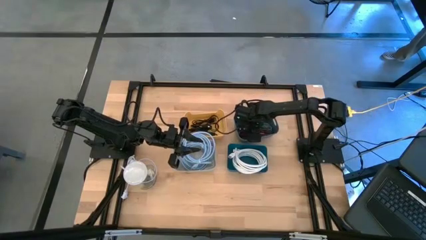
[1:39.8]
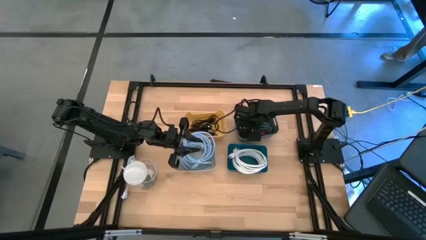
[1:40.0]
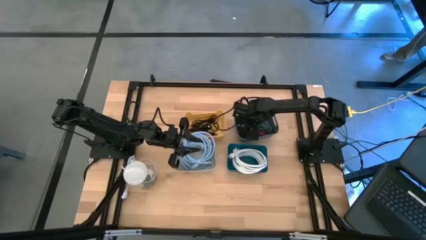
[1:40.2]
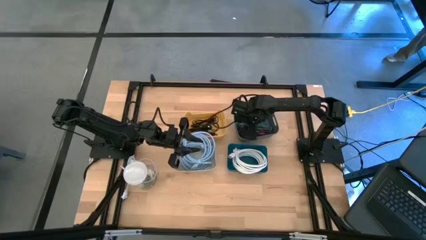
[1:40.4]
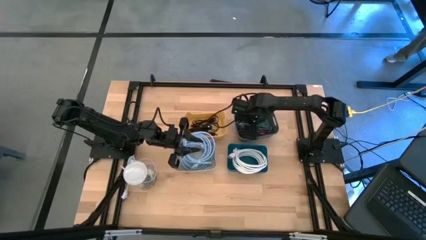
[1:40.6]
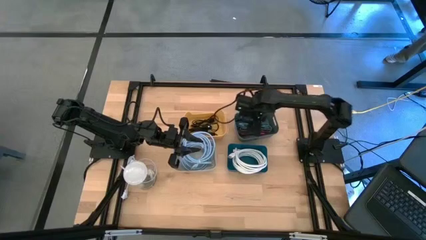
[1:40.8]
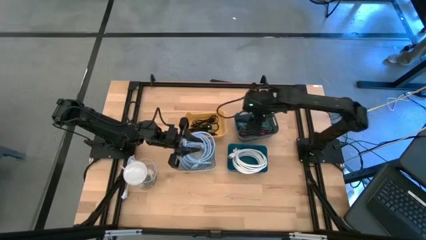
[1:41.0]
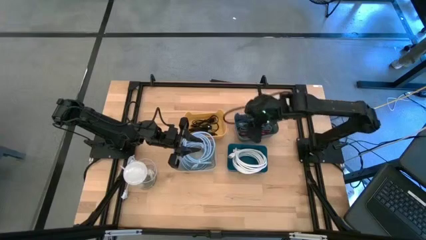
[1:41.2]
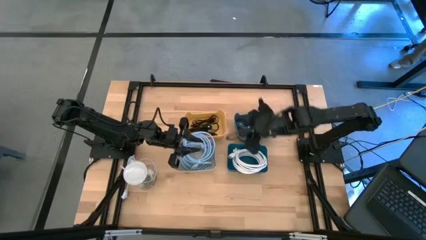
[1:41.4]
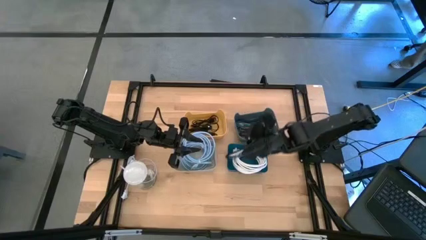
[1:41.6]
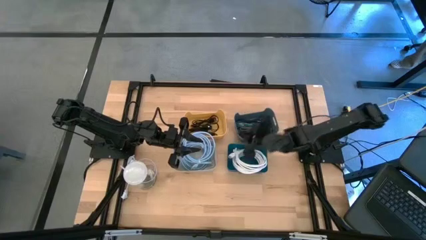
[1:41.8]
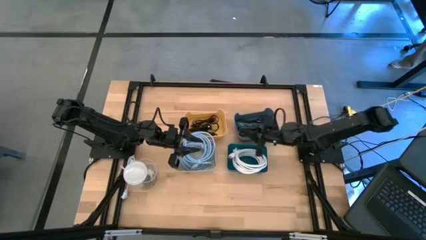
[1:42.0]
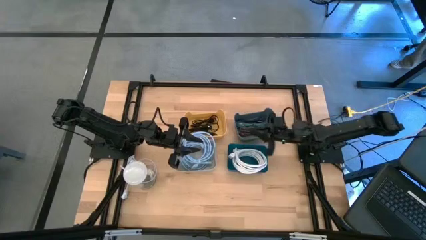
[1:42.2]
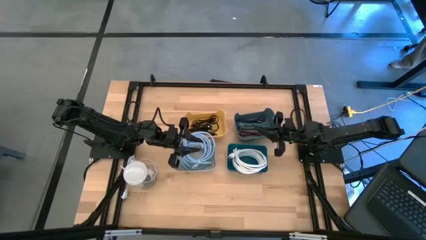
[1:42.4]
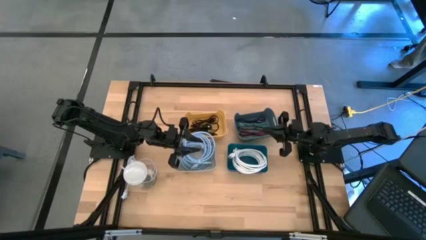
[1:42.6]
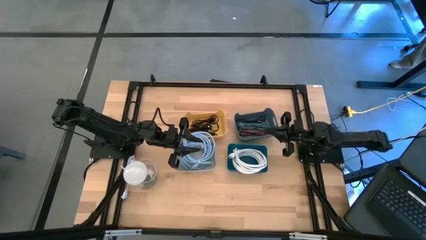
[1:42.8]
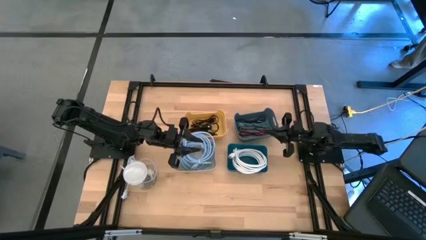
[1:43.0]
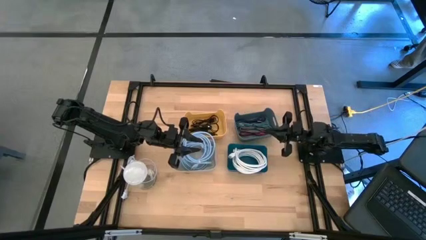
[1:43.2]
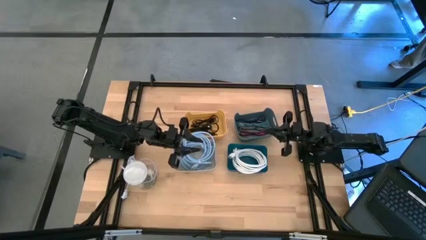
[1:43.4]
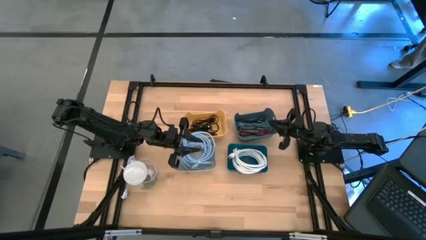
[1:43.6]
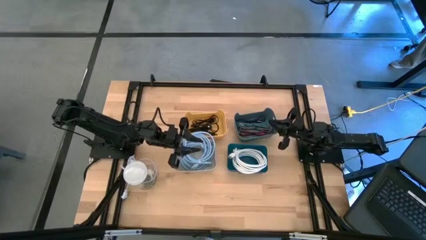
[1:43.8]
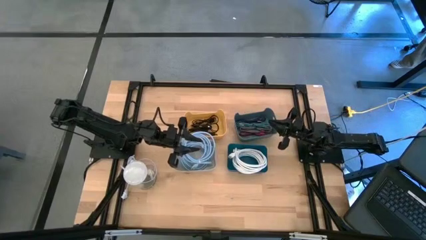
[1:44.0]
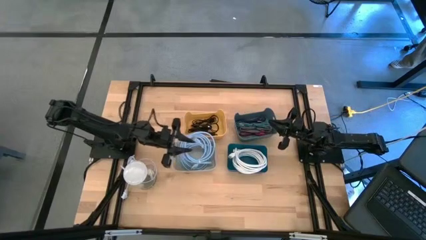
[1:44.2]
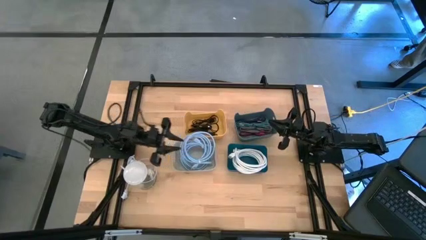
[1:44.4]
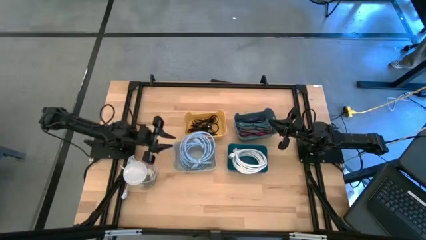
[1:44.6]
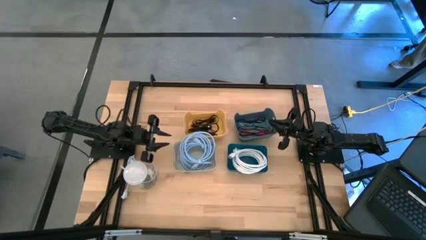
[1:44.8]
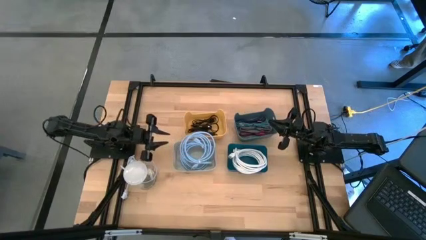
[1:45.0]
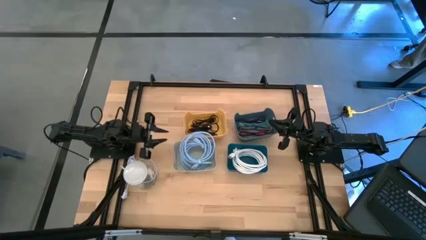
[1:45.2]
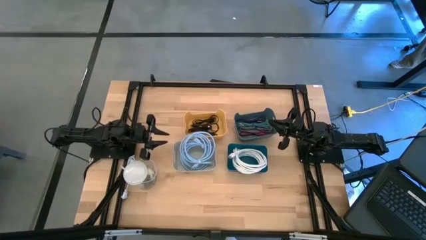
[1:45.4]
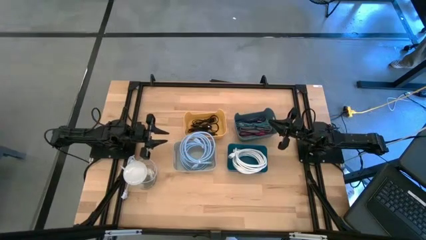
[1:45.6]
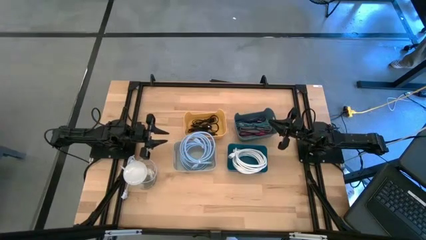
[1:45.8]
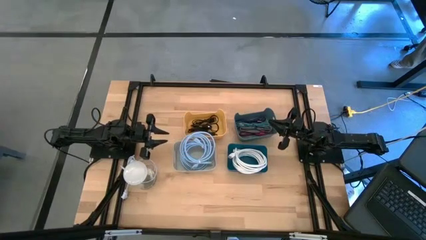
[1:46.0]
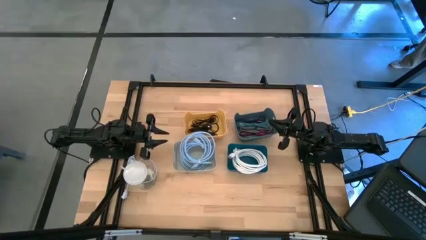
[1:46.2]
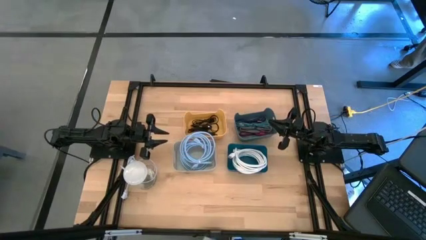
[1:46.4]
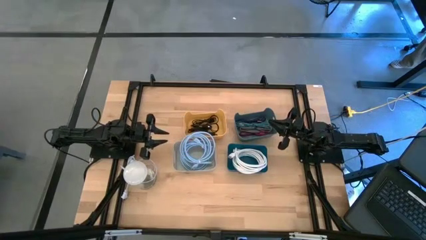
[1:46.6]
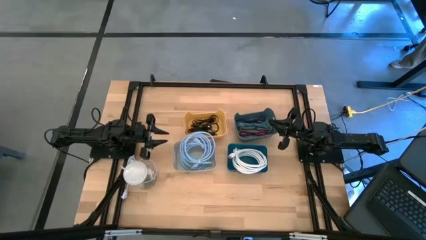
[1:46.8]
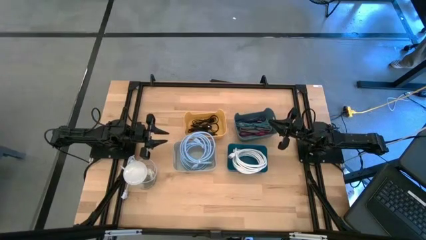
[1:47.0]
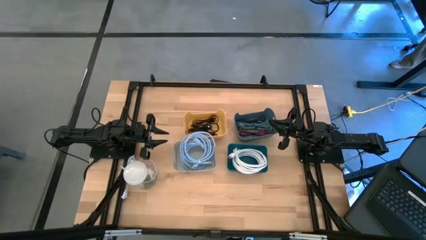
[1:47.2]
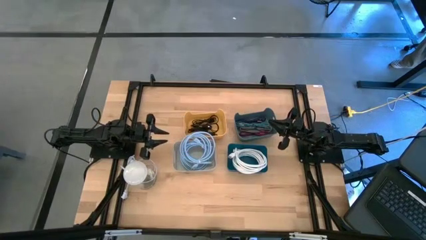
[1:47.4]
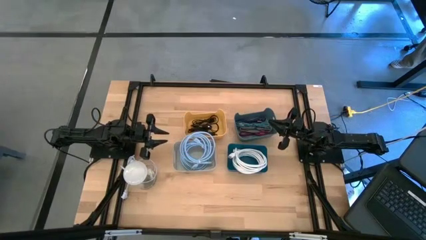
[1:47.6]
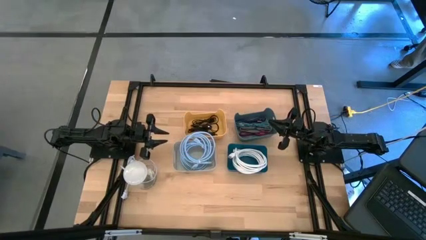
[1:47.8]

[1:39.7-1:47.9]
Task: Pick & Place USB Port
Return to Home Position

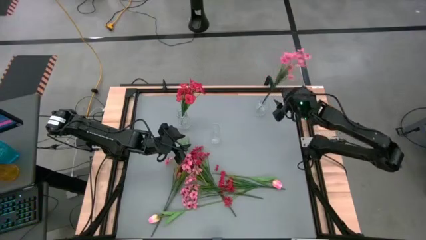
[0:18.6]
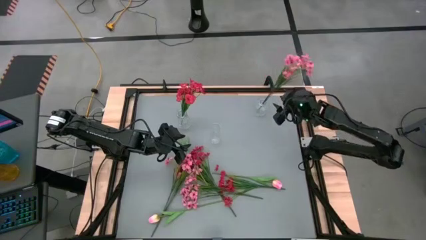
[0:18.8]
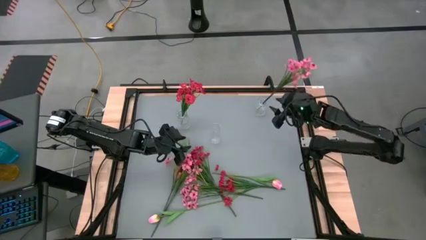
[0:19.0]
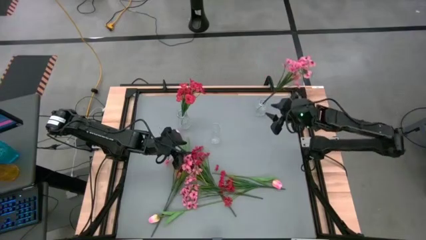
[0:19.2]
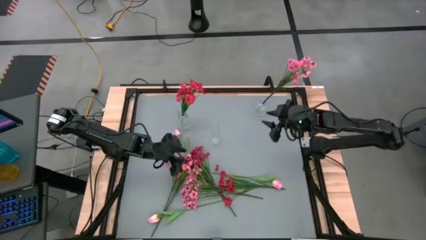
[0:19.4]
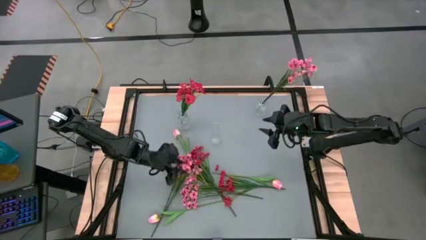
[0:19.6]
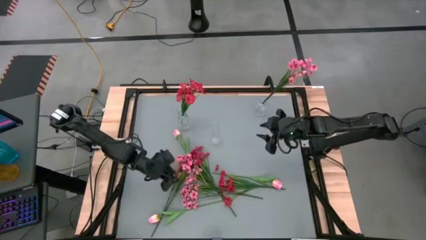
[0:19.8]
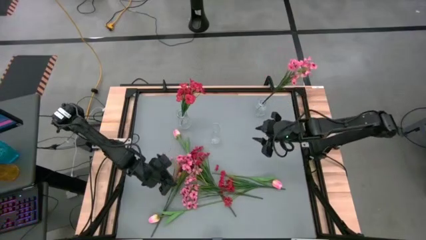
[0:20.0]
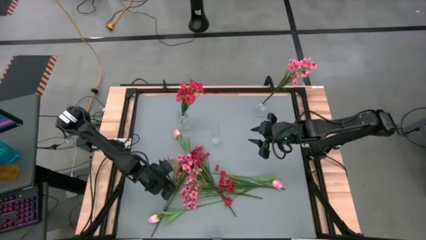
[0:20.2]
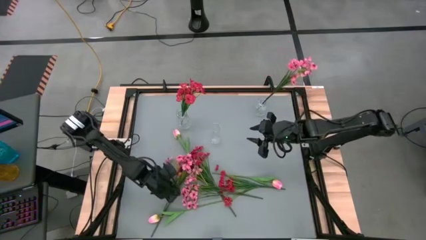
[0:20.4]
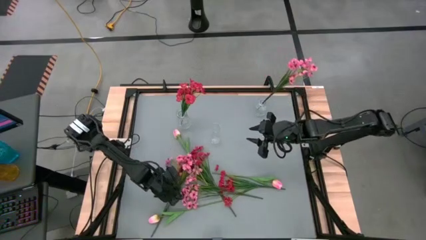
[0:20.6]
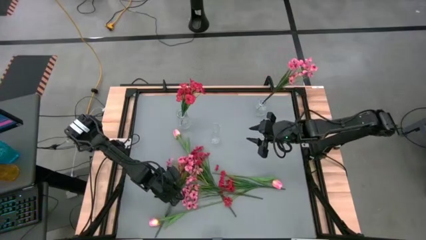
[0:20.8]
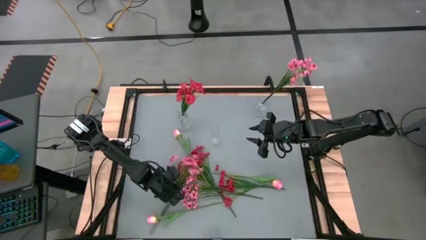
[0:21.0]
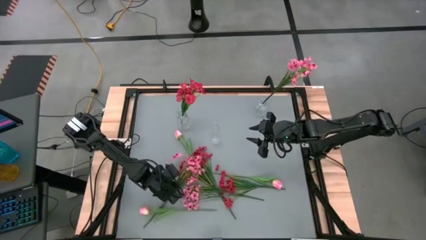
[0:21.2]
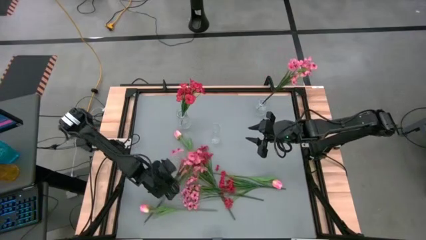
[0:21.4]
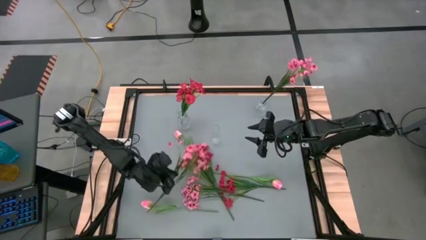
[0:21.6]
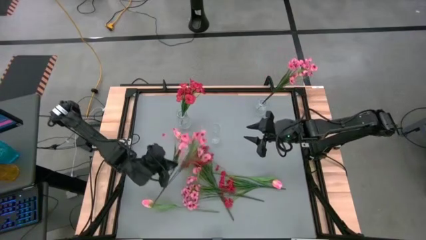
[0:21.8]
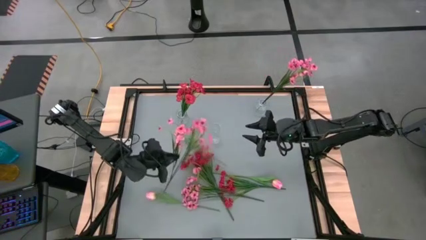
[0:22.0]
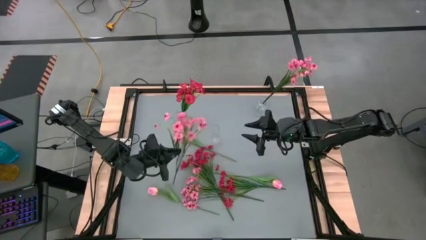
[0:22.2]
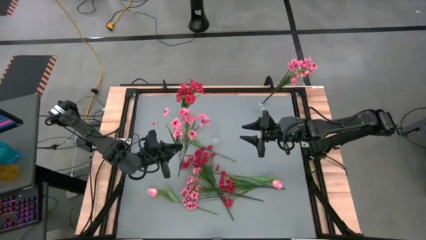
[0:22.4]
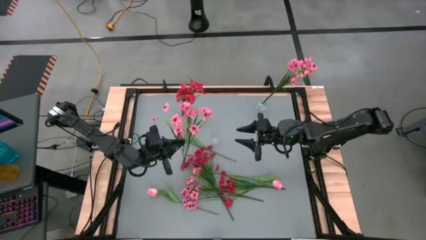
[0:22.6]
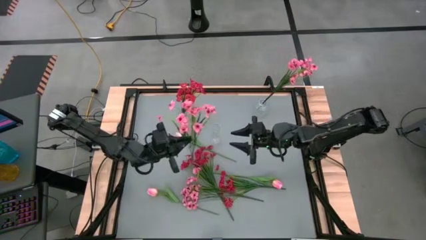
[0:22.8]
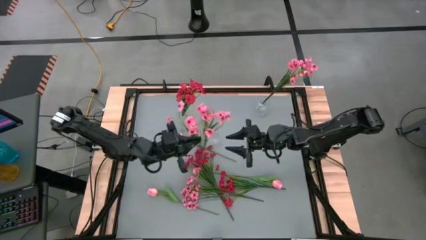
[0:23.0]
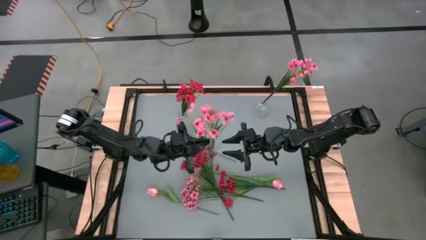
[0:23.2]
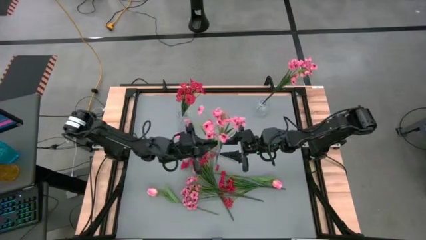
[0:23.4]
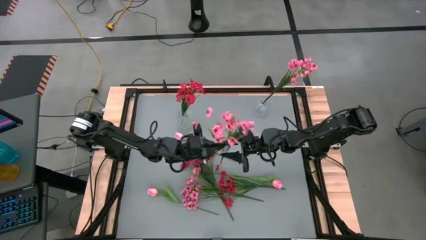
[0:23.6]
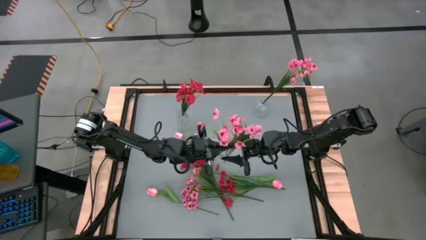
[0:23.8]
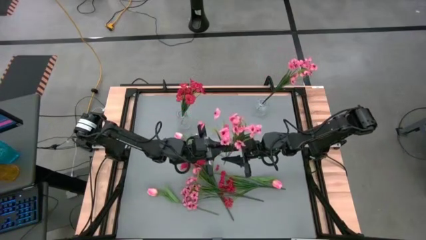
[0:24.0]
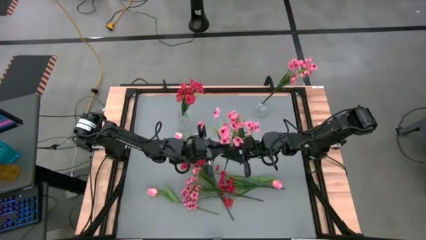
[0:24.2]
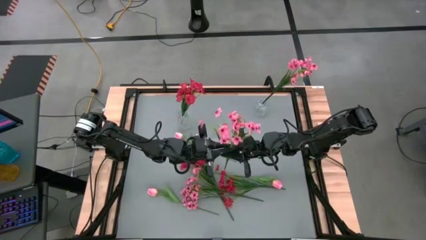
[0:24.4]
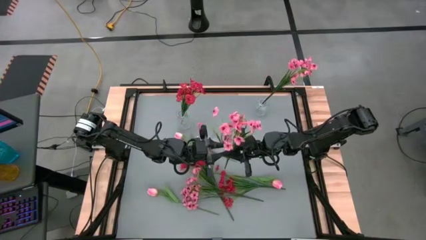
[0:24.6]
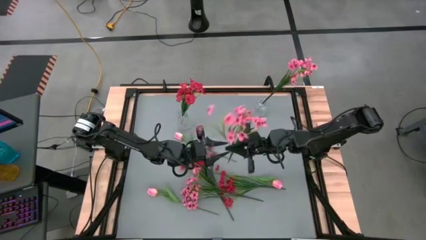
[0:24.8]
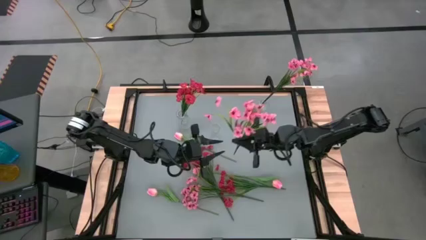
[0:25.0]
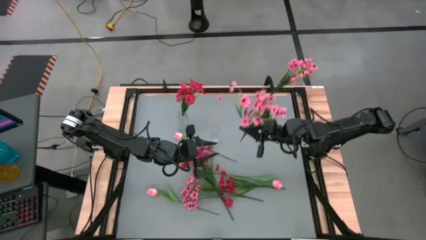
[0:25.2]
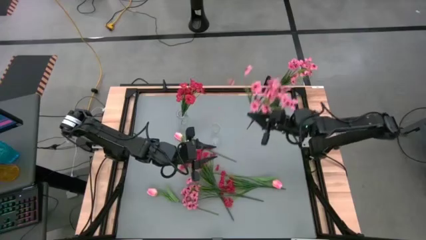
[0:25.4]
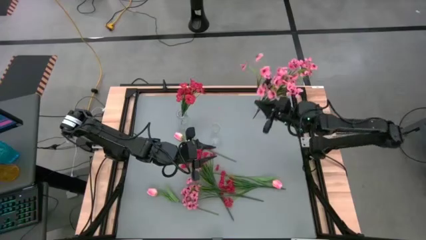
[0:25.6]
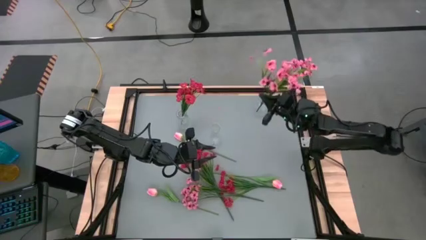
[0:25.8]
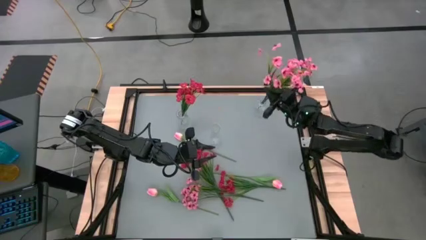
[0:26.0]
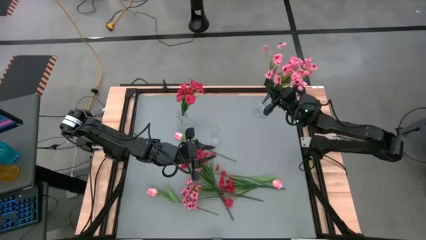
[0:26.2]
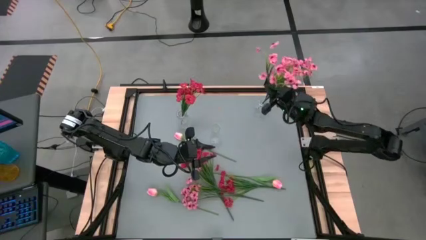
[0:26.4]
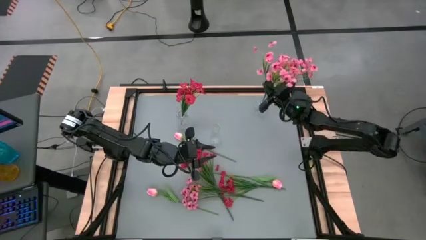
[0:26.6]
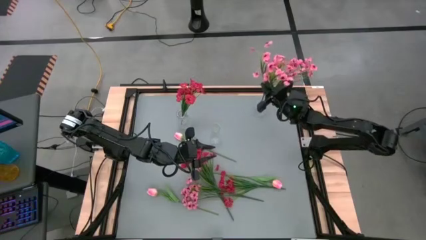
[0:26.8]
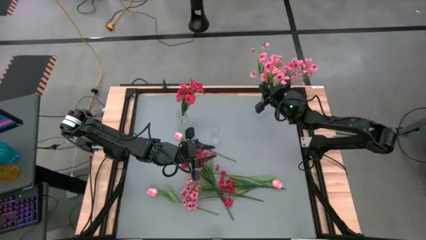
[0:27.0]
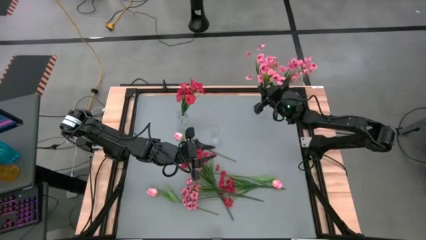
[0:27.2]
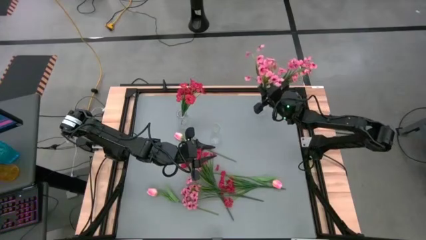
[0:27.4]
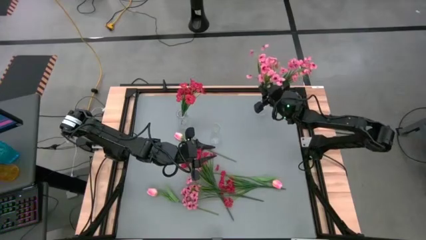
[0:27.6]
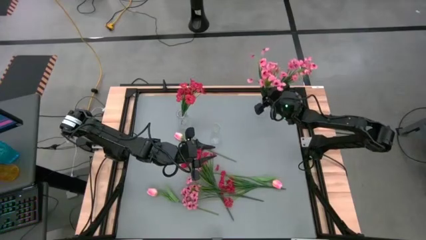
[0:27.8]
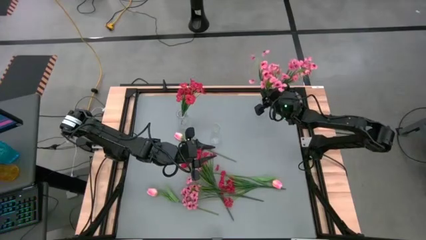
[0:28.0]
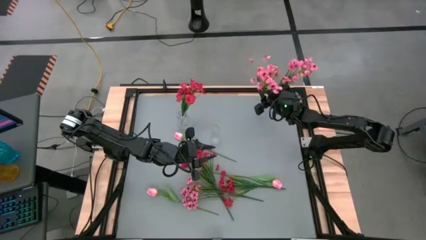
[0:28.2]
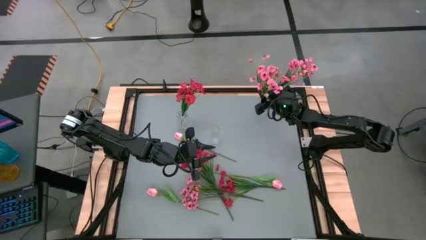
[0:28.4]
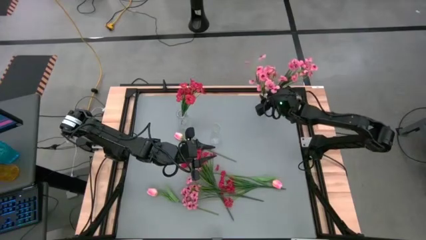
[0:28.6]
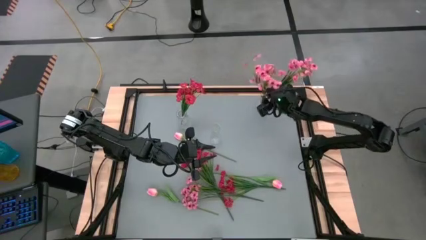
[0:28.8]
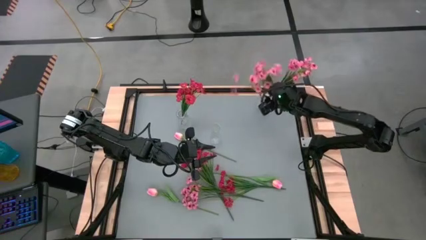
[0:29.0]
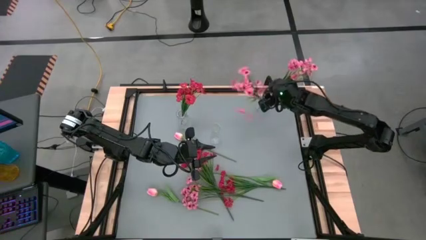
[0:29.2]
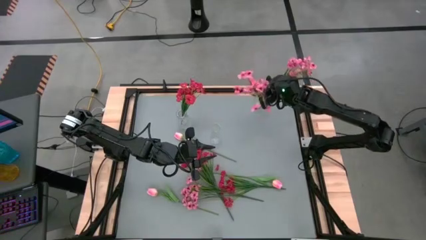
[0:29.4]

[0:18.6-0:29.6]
Task: Sort flowers into vase by color
Put the pink flower into the top right transparent vase
